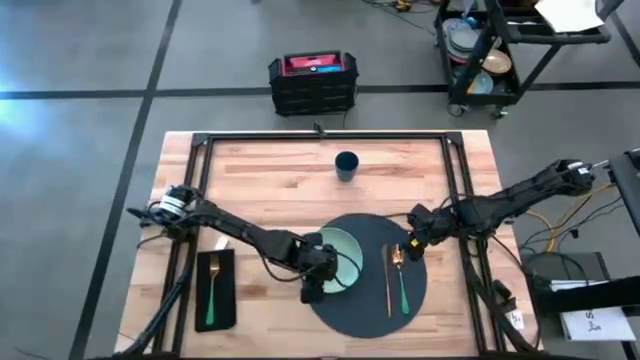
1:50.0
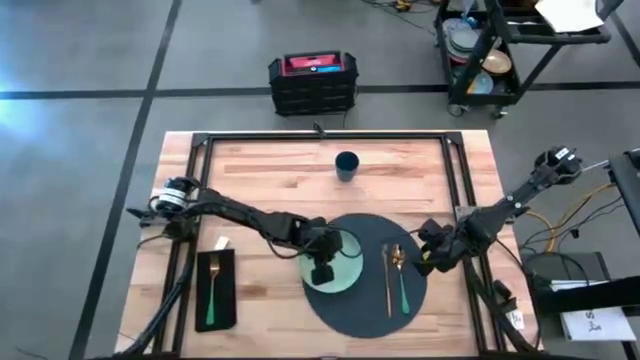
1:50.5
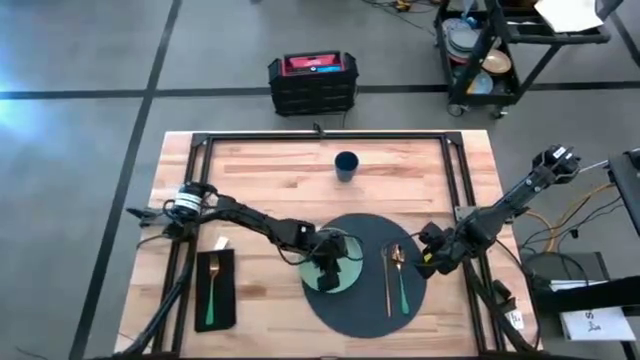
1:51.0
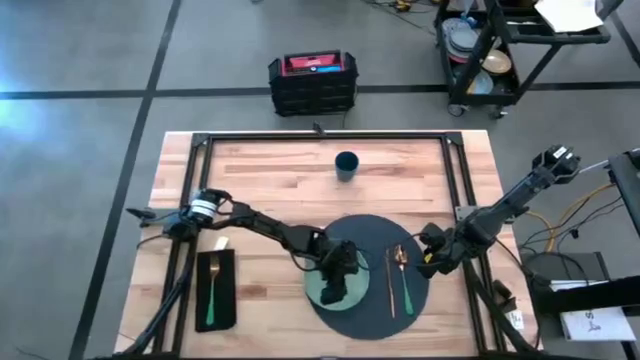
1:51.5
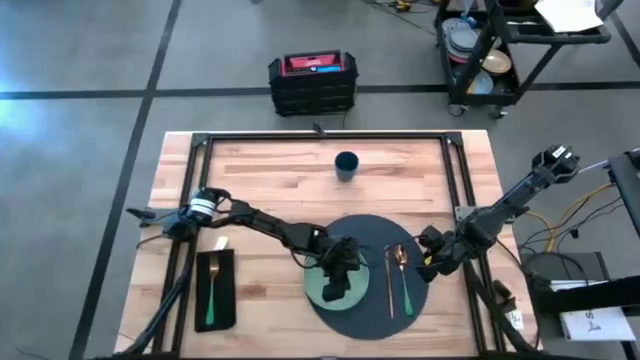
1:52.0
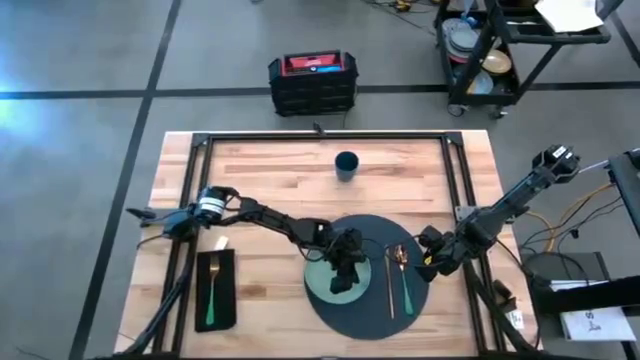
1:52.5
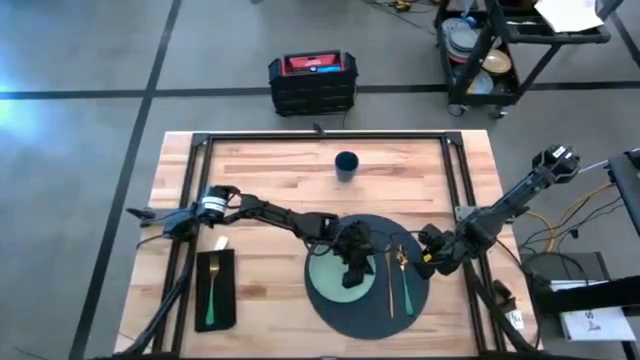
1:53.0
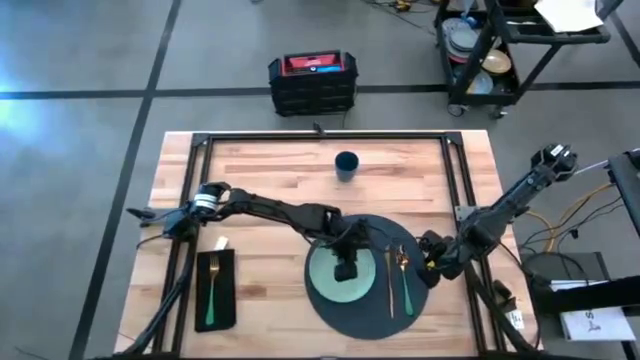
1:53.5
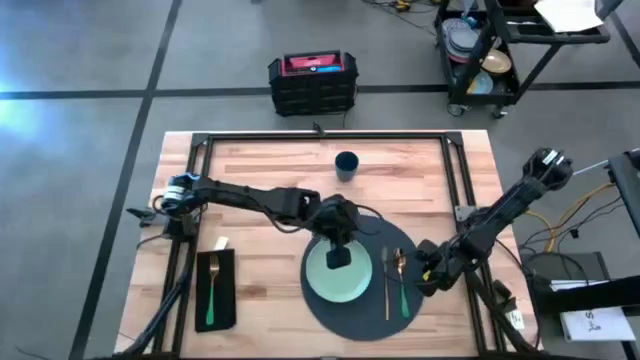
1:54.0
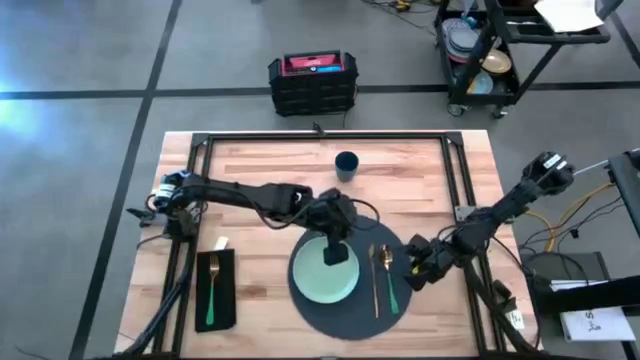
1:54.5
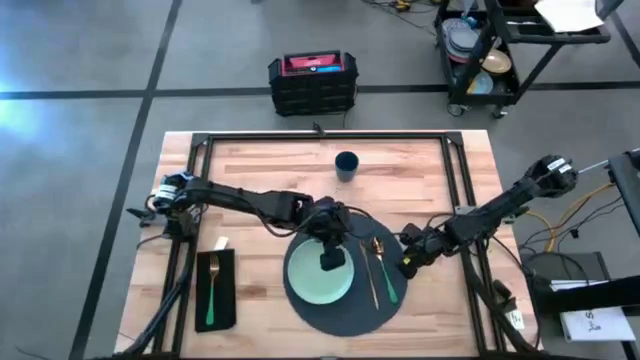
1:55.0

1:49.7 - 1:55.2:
Task: Set table place
Adjust the black placemat

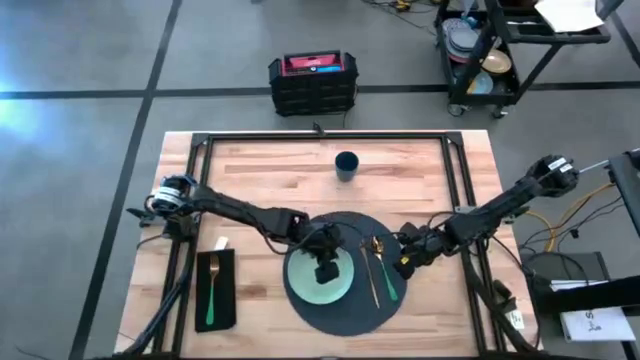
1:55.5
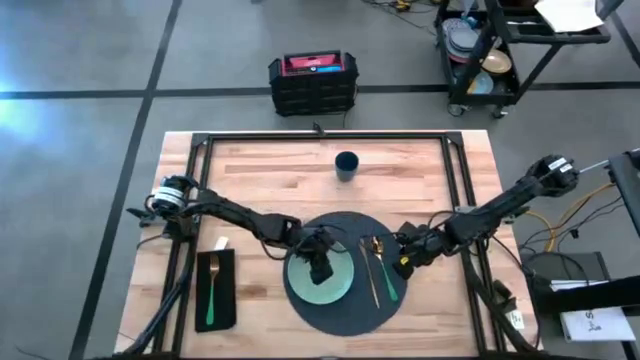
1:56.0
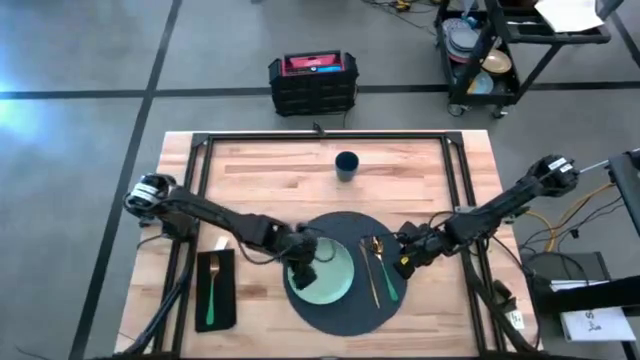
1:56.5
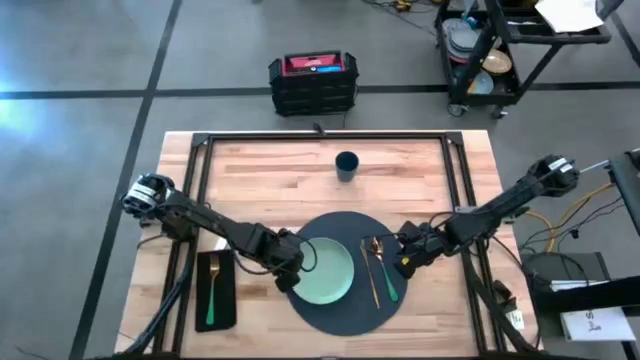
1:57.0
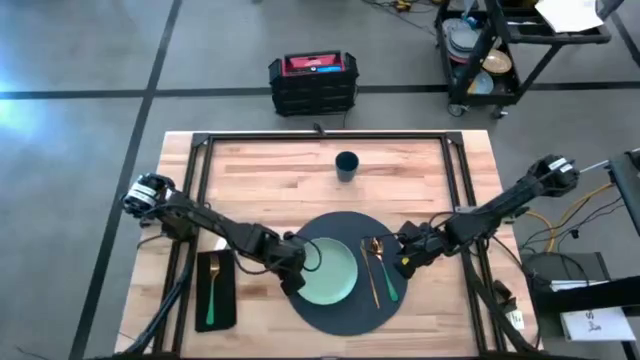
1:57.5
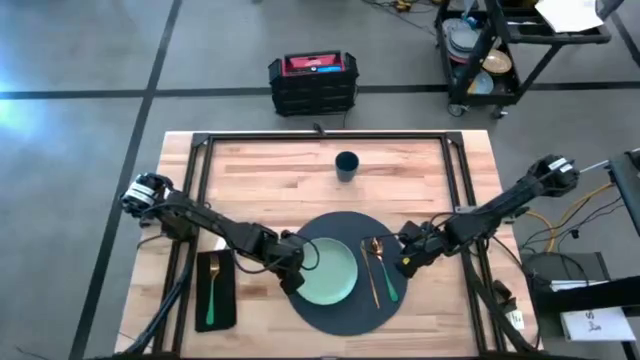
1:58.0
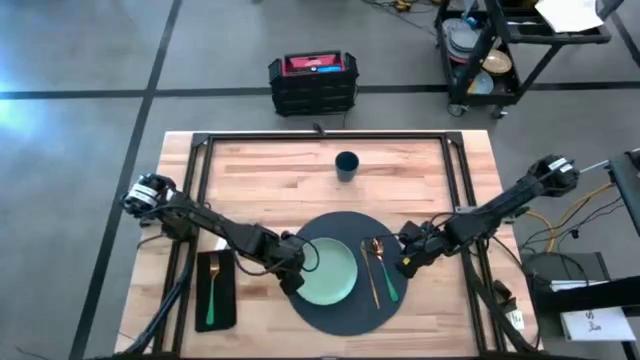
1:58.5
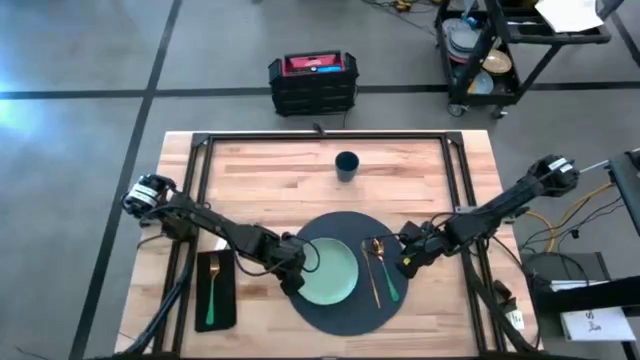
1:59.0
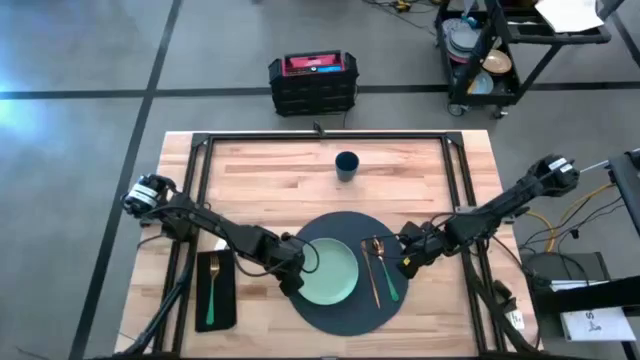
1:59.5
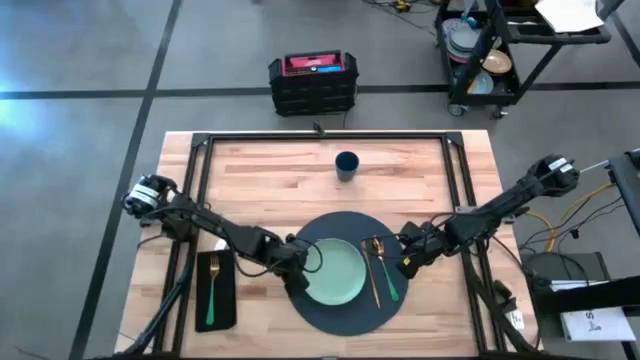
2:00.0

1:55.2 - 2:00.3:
Adjust the green plate

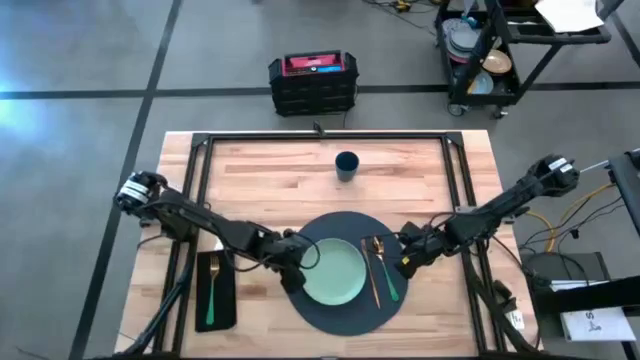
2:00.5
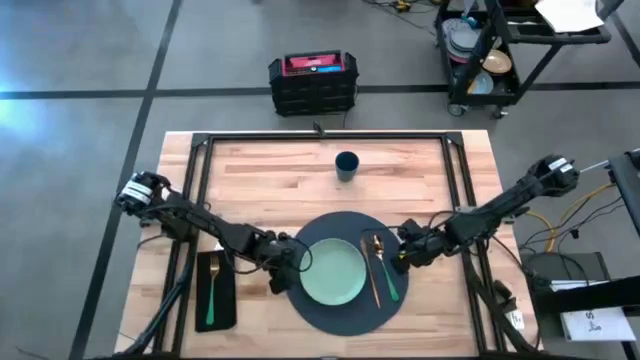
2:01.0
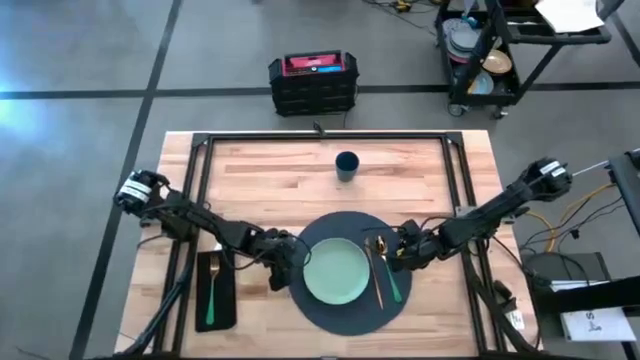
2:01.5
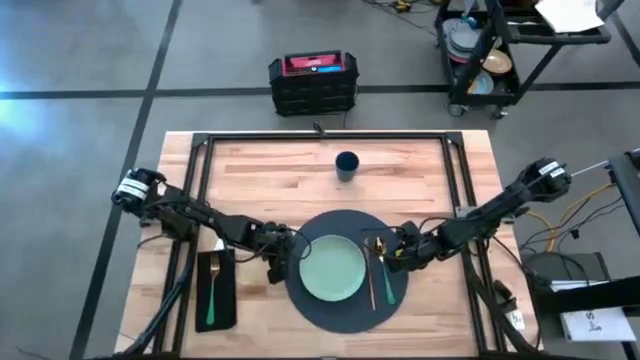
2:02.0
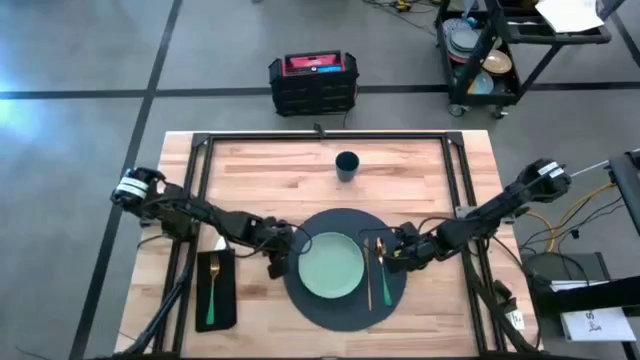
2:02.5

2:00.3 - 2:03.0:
Adjust the black placemat

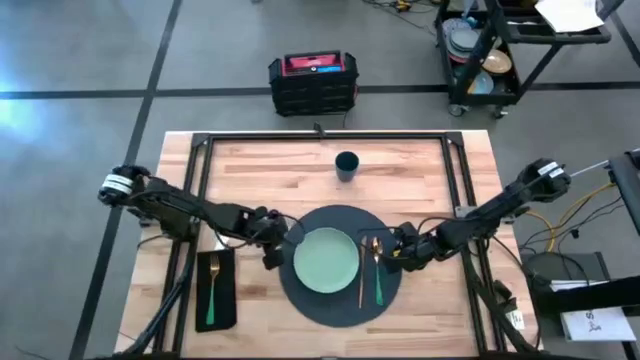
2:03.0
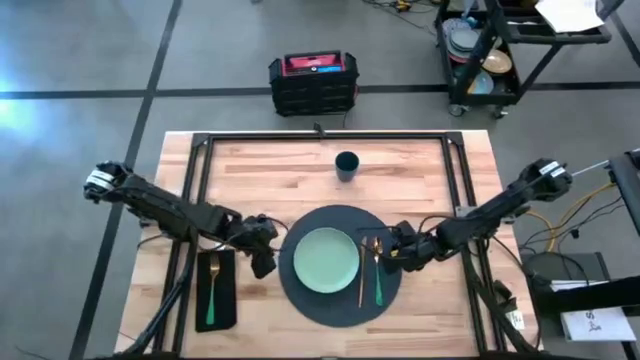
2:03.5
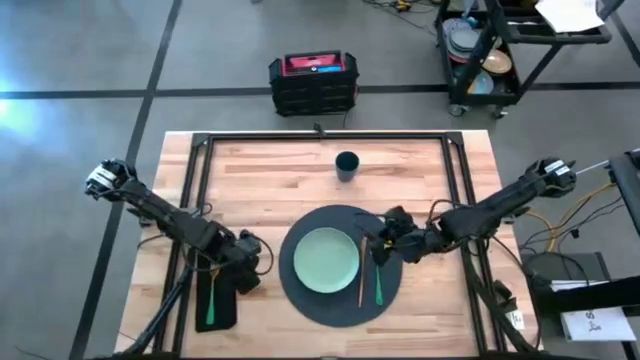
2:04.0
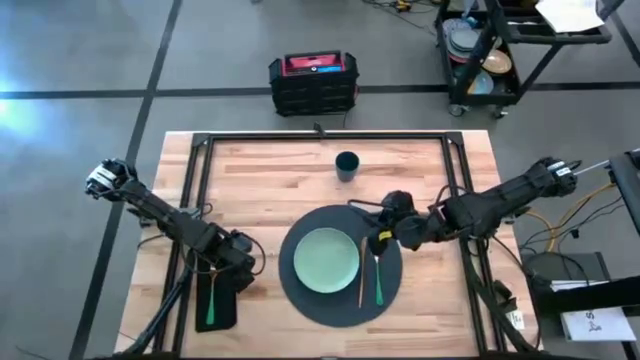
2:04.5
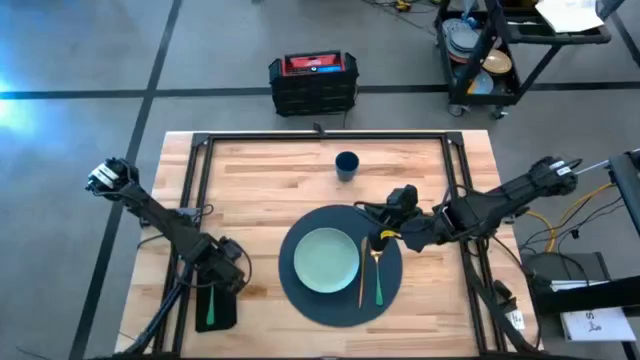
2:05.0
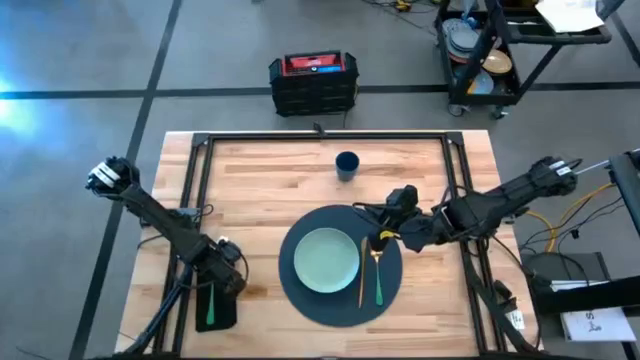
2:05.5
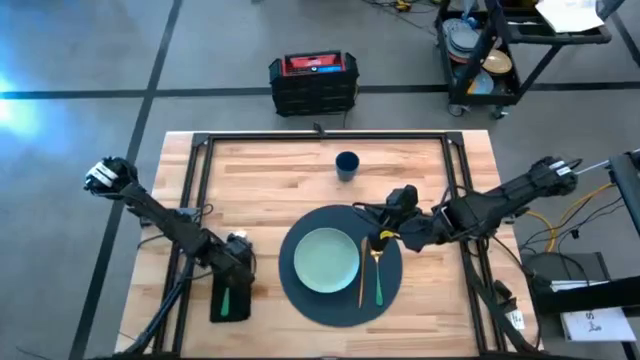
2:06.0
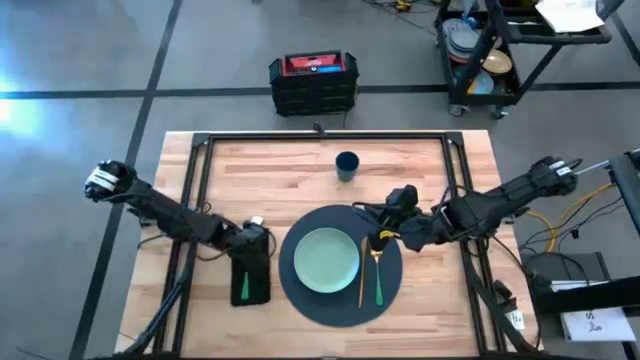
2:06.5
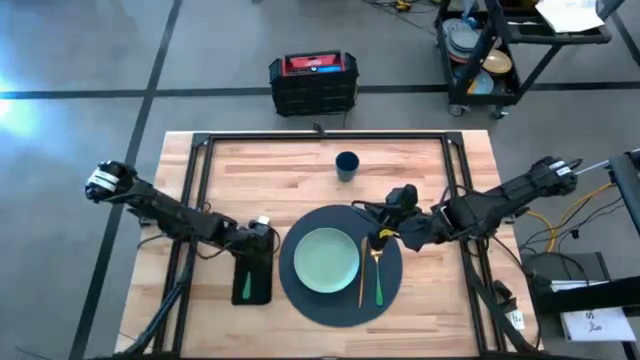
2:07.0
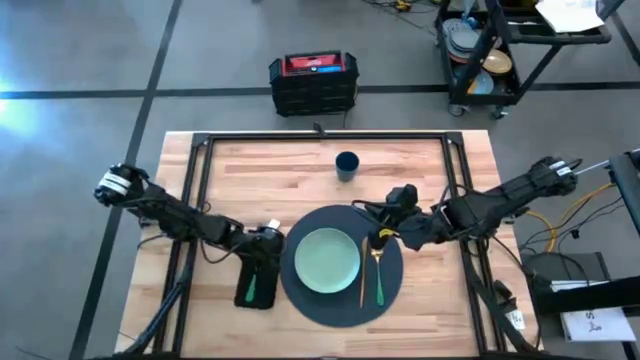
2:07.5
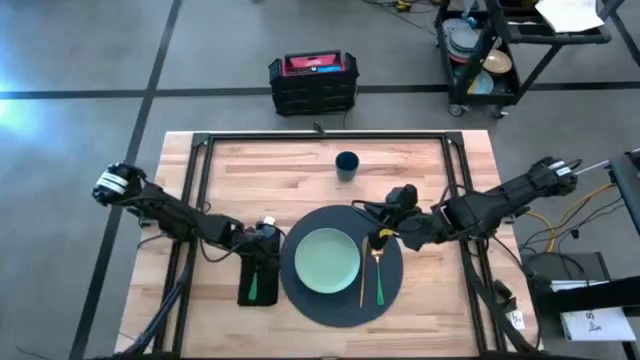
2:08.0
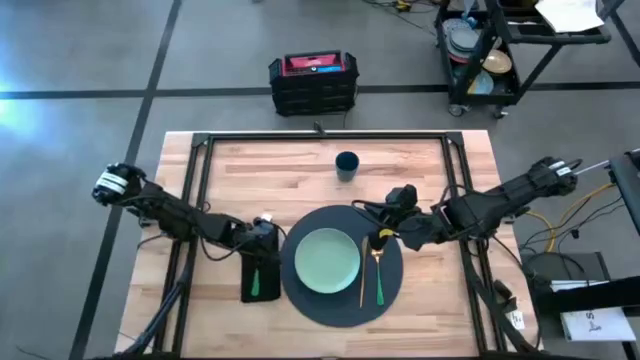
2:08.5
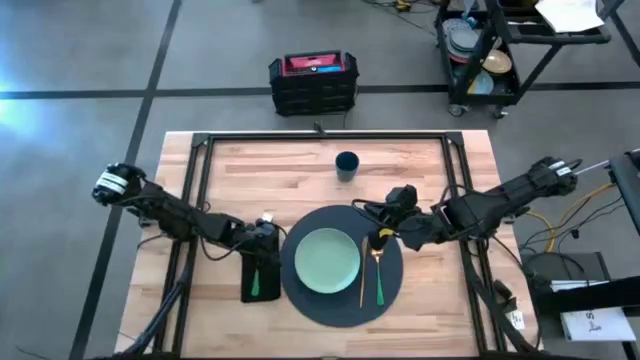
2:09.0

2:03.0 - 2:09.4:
Move the black napkin to the left of the black placemat

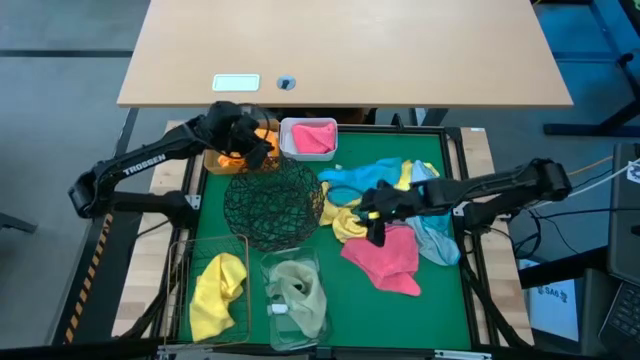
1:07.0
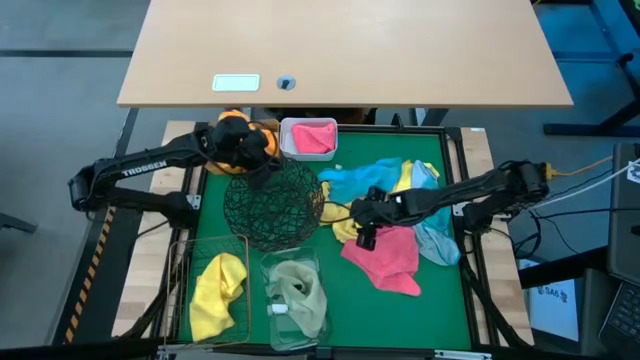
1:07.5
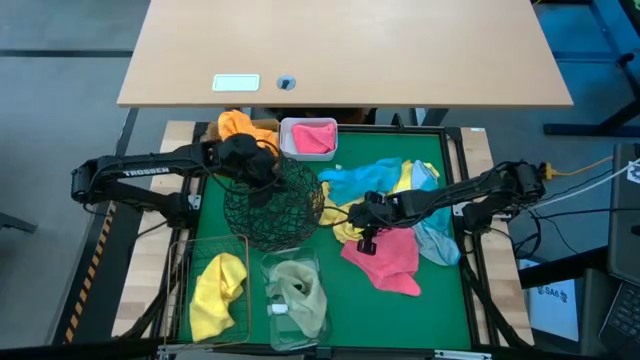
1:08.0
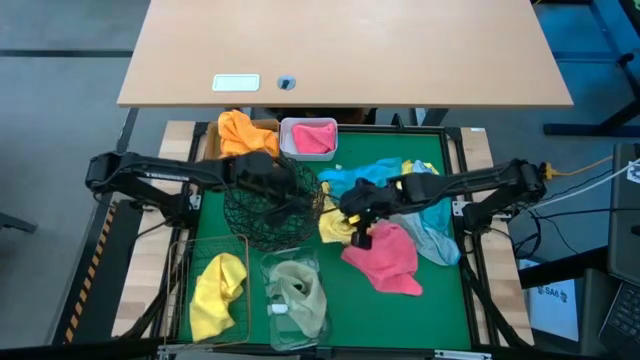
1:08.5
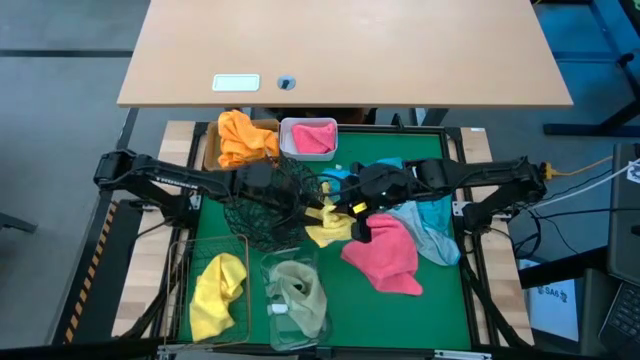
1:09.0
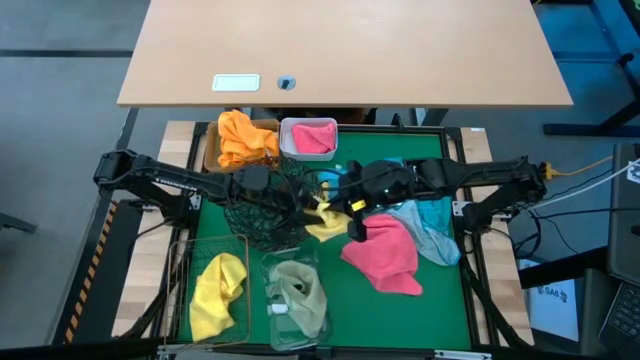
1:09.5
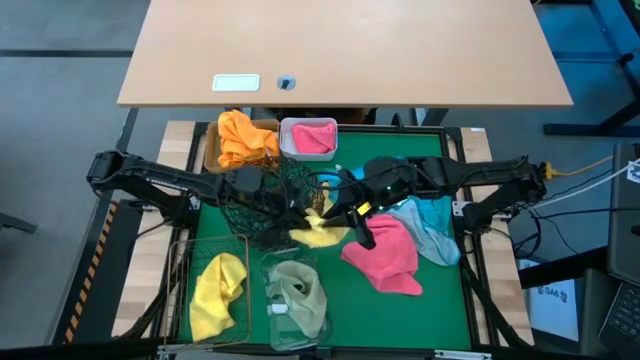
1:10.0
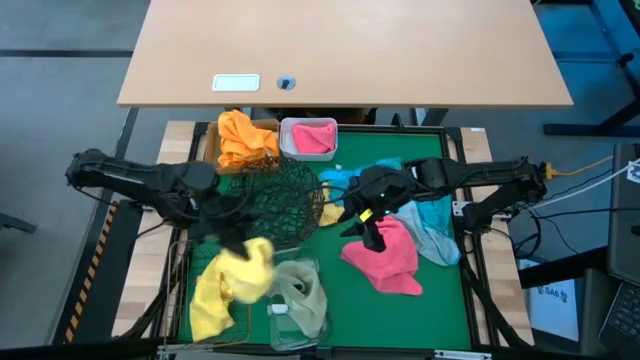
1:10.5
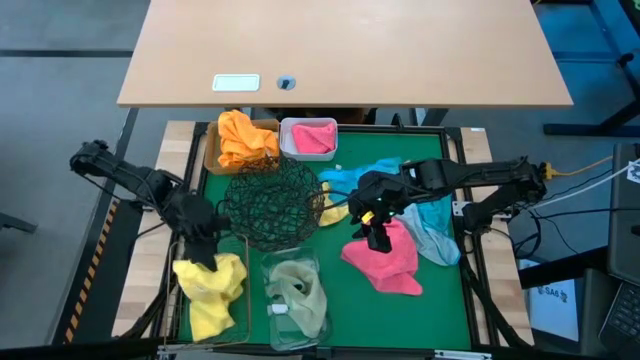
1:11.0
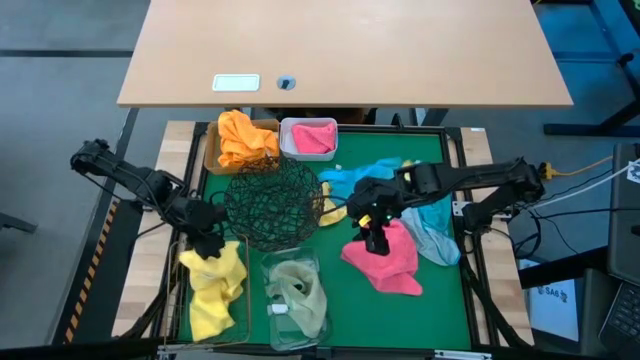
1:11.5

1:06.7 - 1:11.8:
Task: Sort microfiber towel by color & place in baskets
Put the yellow microfiber towel into the wire basket
